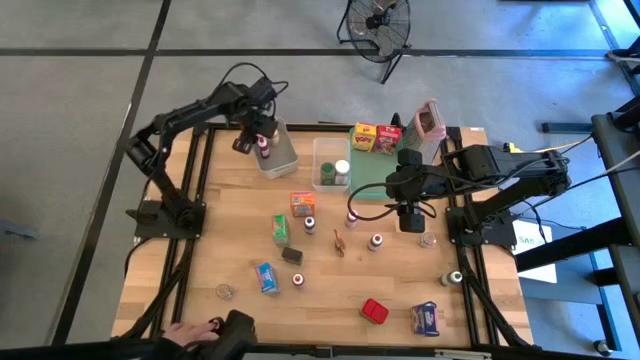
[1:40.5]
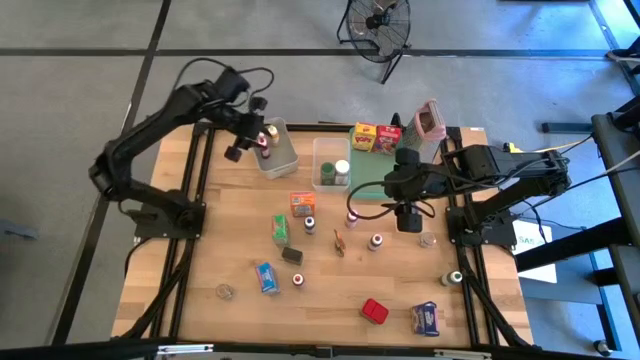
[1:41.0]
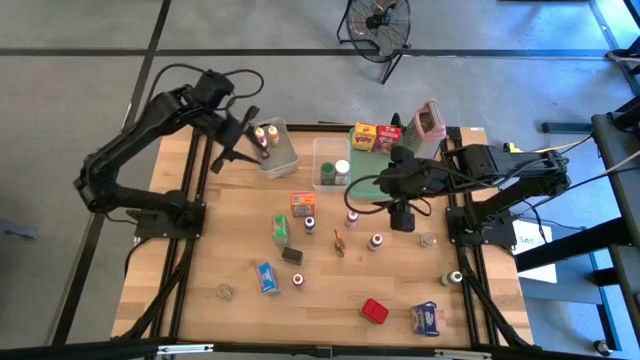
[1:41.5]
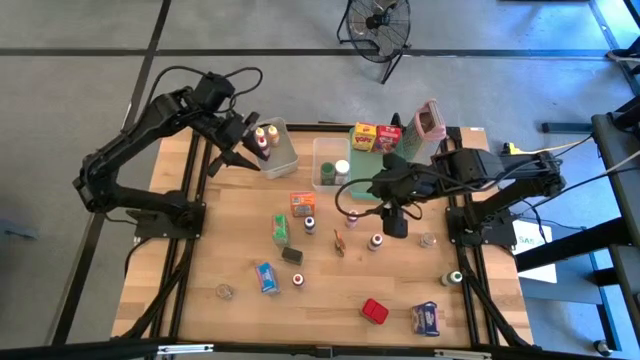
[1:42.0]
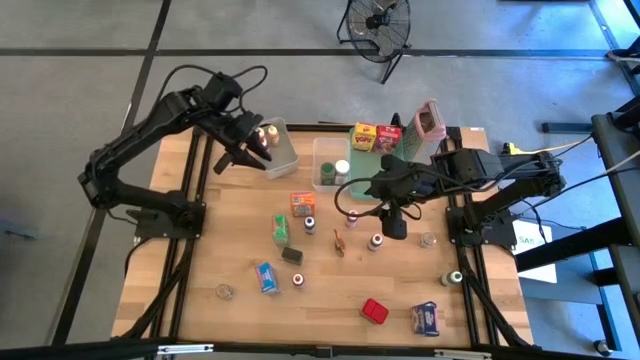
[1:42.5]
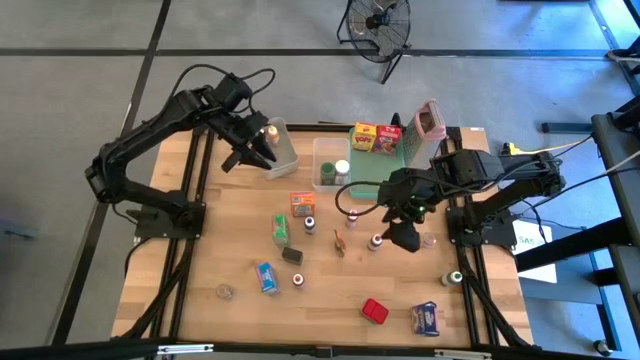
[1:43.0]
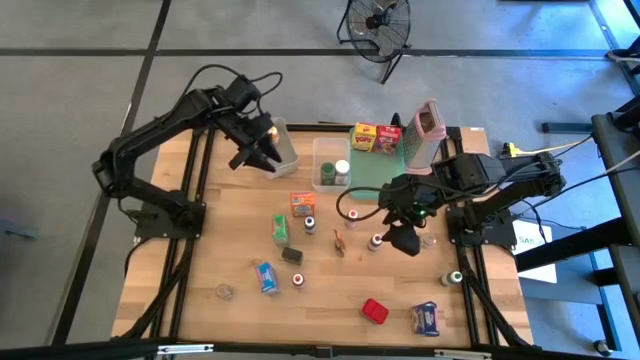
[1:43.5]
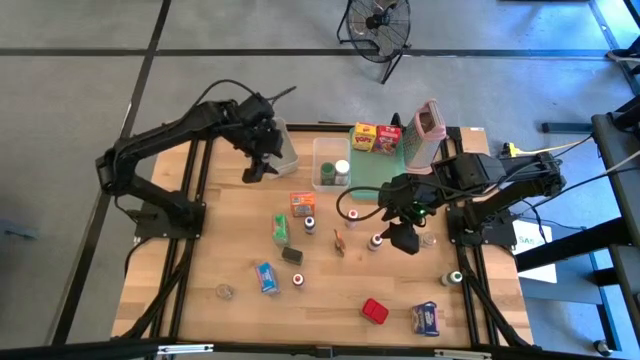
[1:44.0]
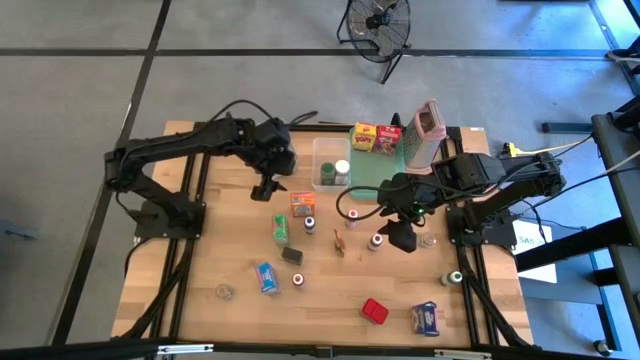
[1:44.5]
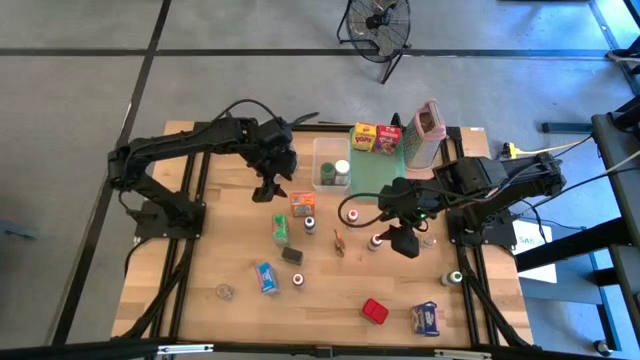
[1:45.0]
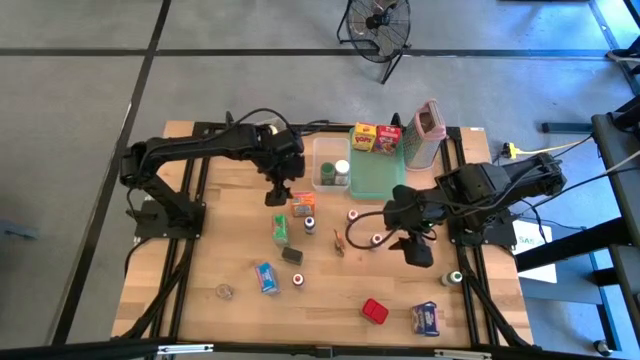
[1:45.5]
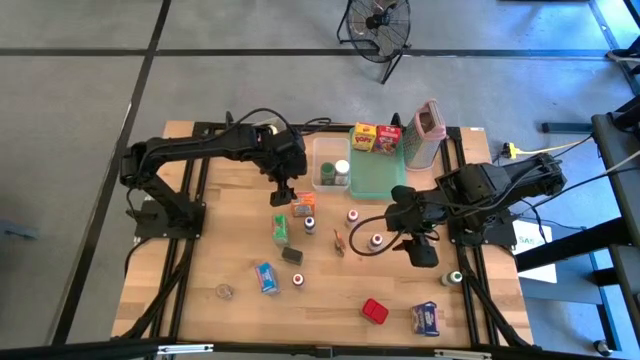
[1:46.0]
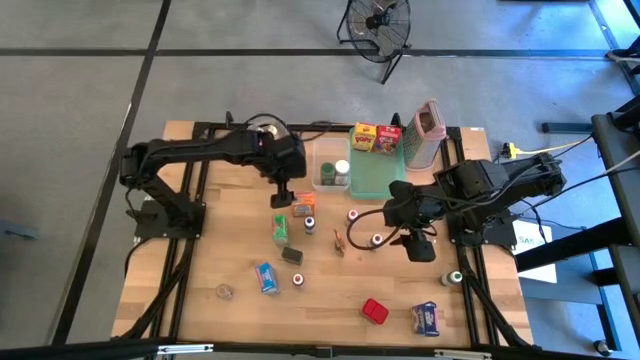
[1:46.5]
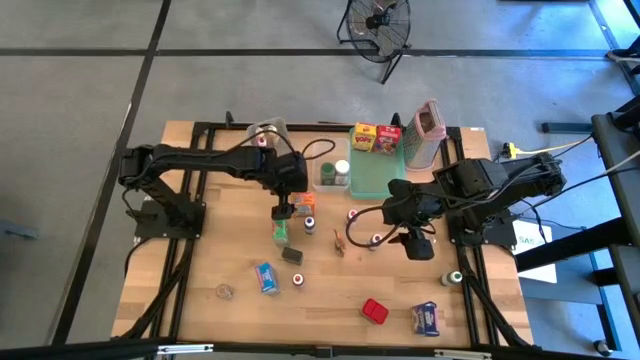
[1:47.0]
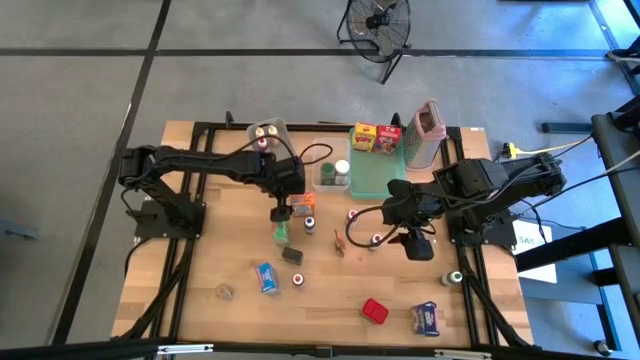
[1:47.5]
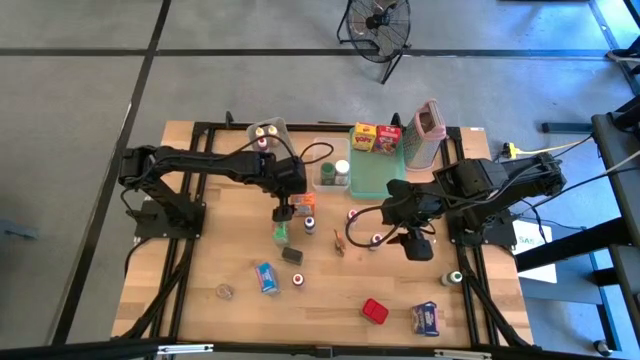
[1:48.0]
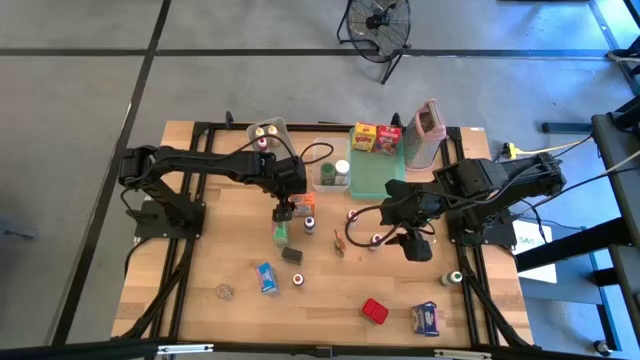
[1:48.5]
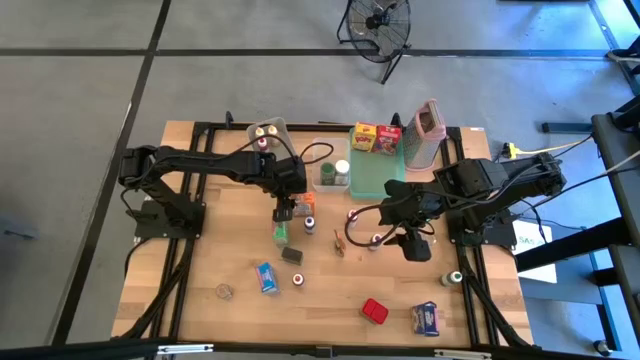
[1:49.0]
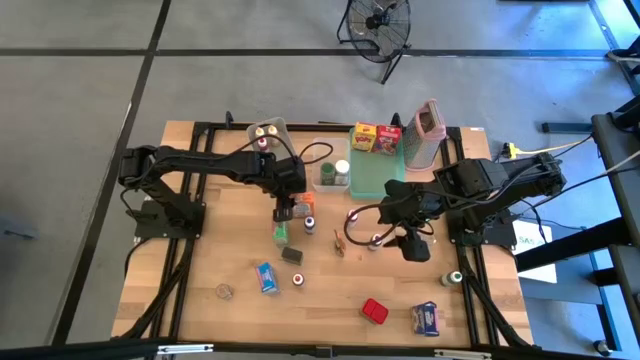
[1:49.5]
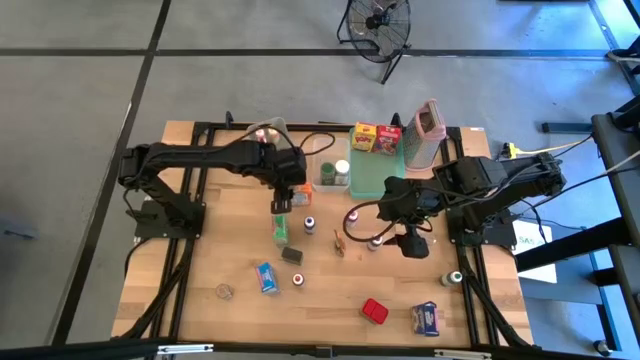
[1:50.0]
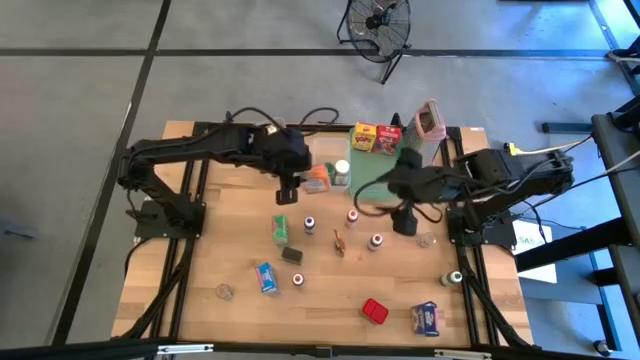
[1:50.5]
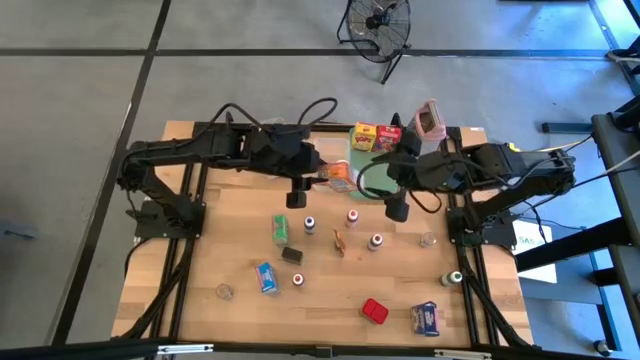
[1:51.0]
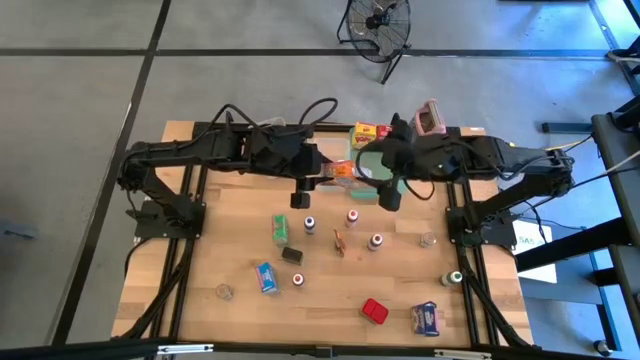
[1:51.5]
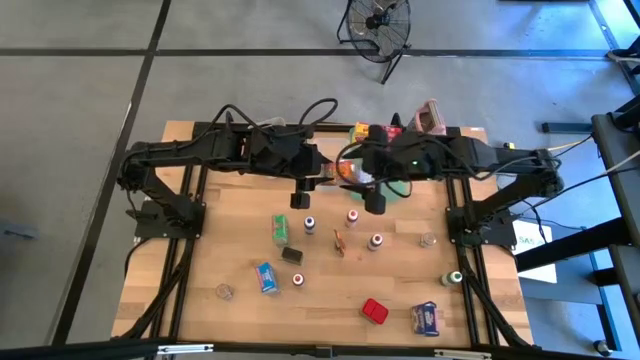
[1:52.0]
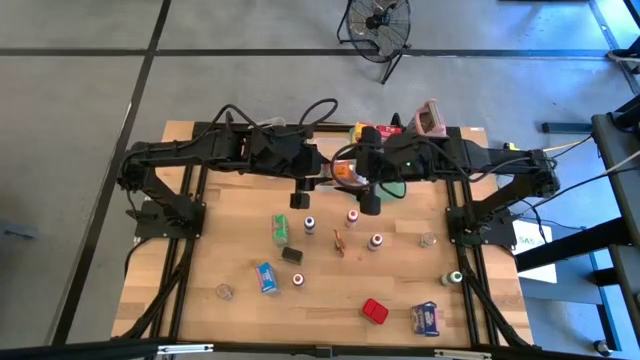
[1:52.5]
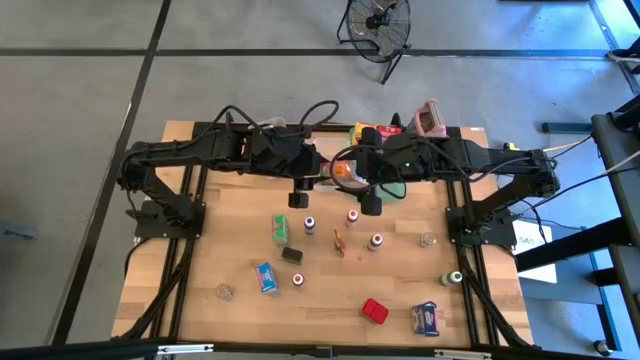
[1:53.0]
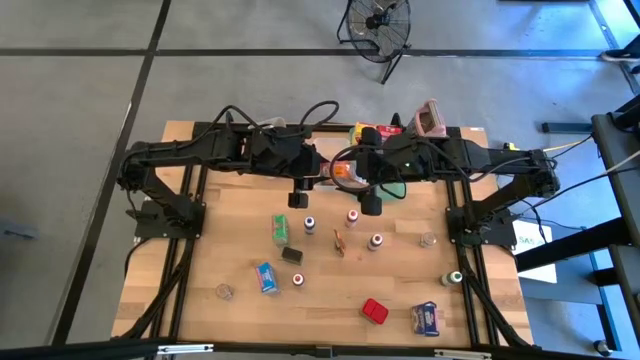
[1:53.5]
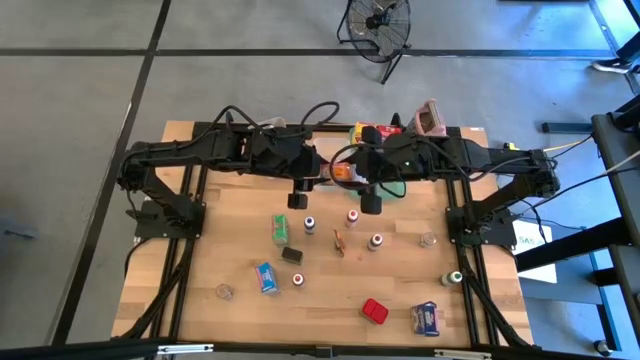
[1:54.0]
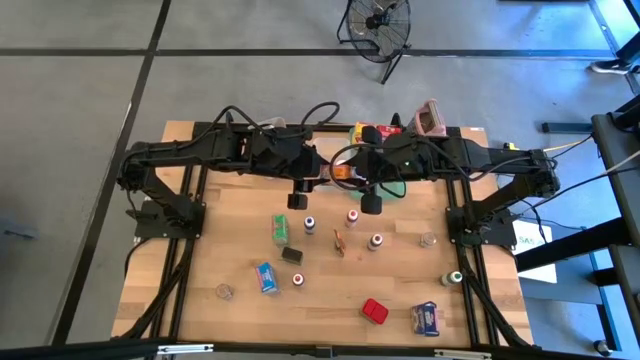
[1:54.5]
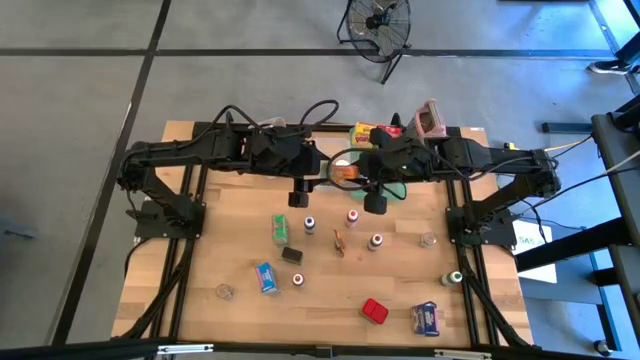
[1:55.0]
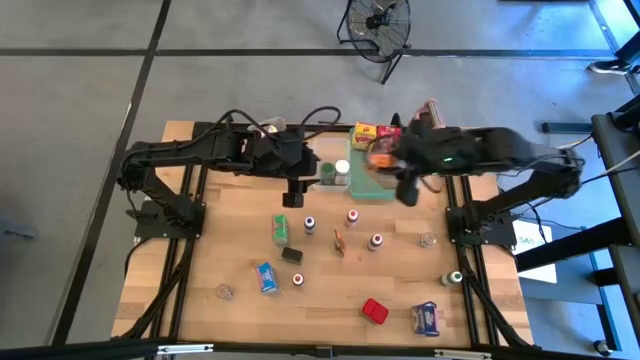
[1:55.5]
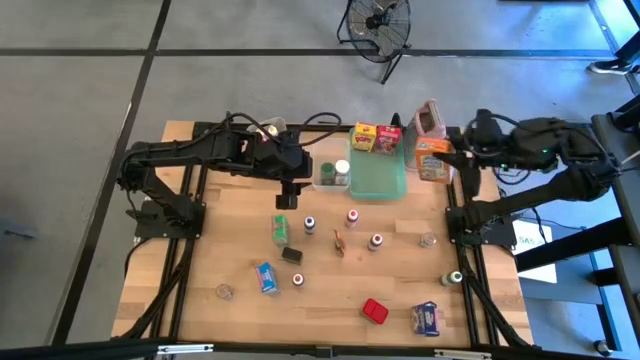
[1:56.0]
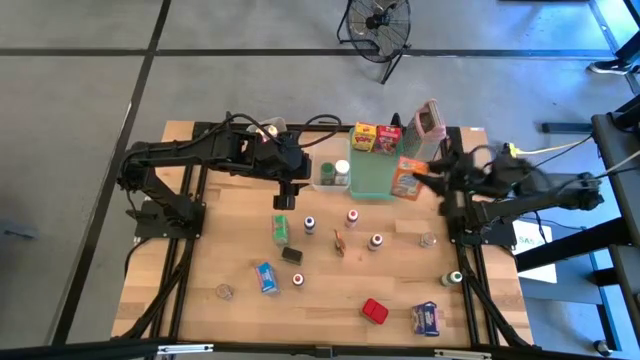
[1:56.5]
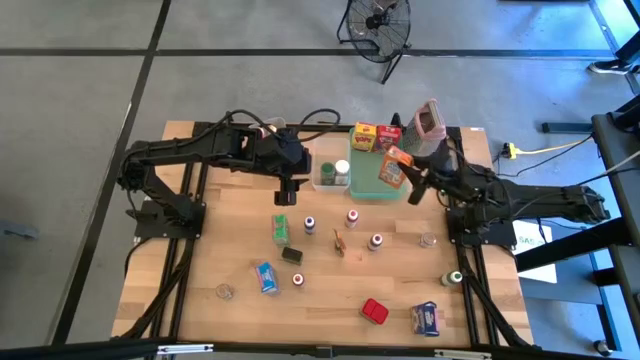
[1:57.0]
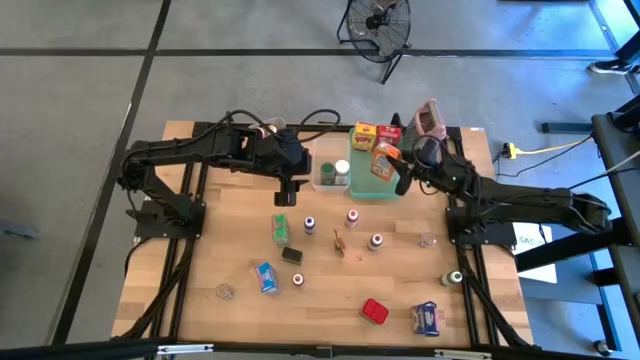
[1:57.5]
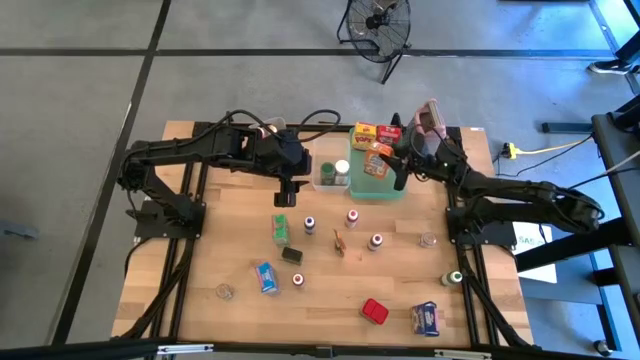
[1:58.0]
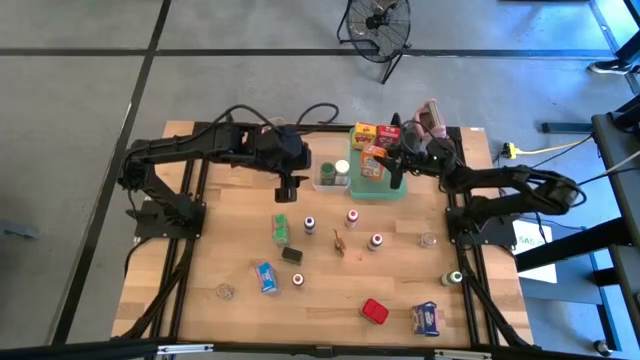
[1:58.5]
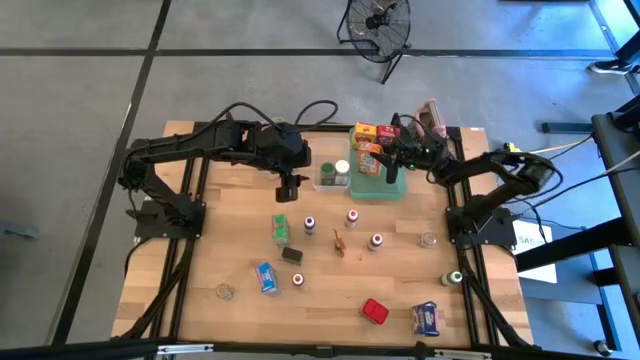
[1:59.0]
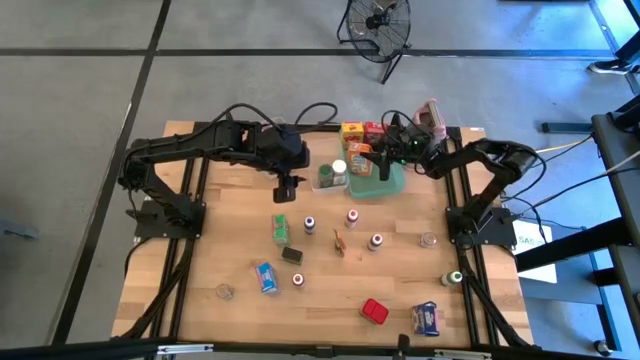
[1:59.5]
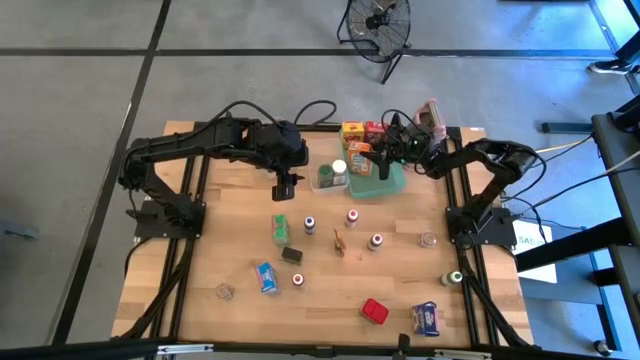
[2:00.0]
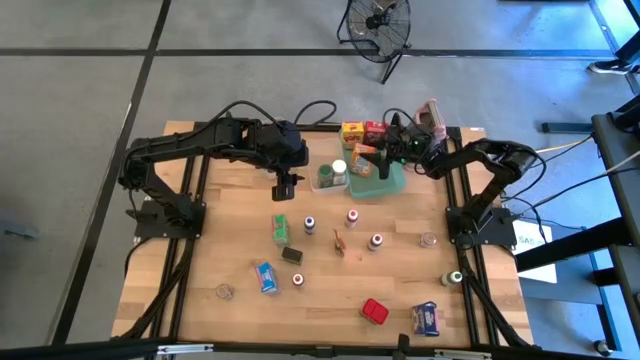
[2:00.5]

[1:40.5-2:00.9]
Task: Pick & Place Kitchen Items
Put the orange cereal box into the green bin
